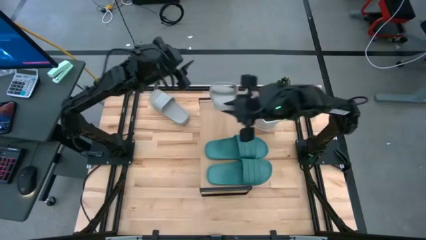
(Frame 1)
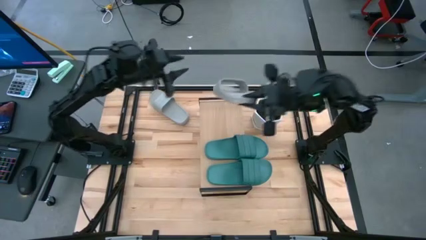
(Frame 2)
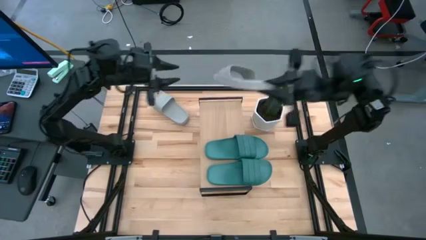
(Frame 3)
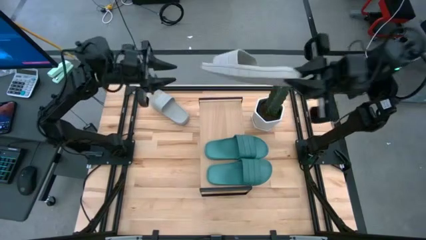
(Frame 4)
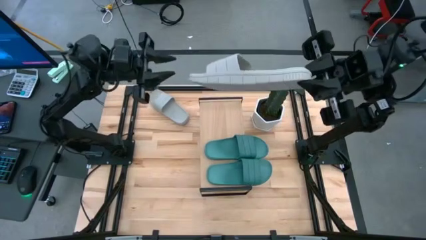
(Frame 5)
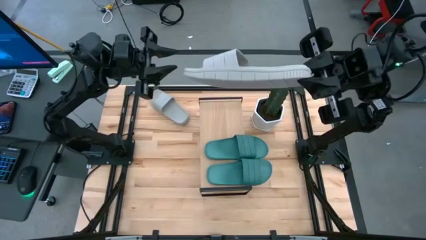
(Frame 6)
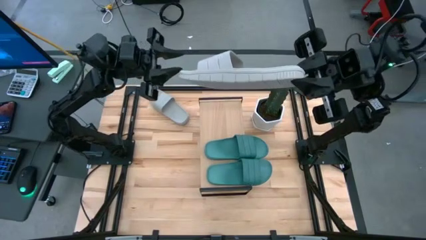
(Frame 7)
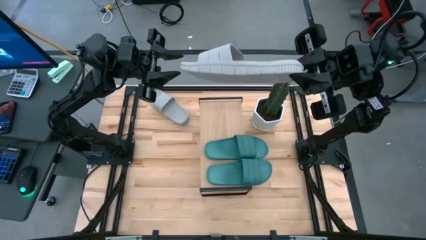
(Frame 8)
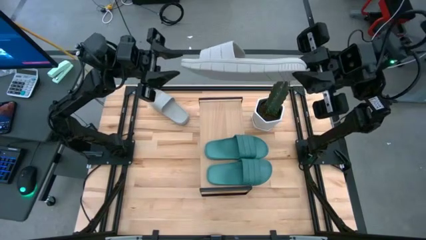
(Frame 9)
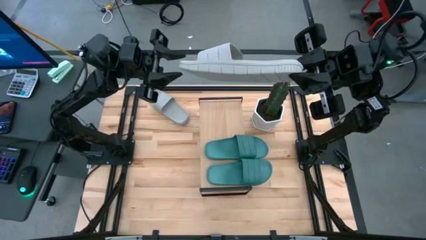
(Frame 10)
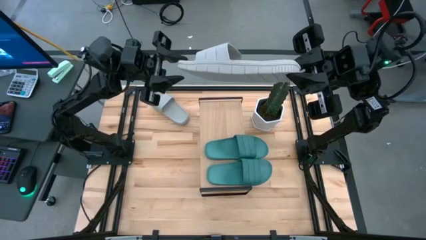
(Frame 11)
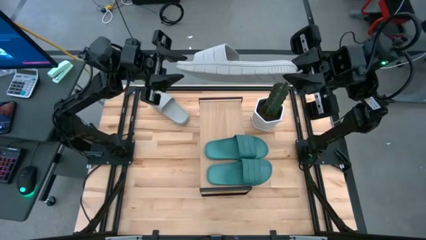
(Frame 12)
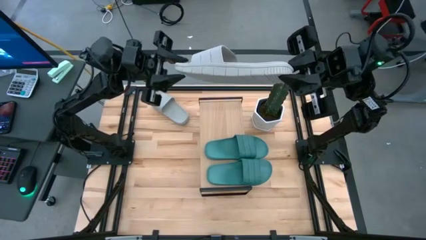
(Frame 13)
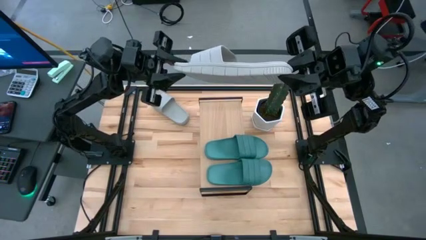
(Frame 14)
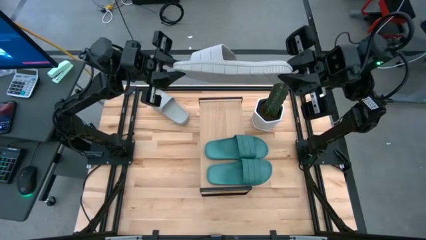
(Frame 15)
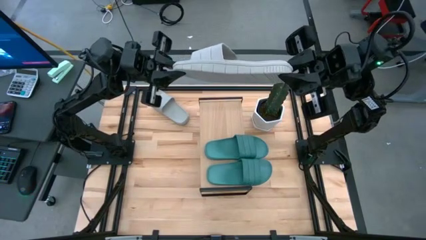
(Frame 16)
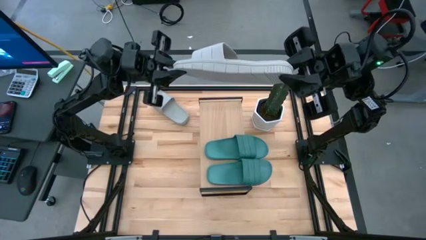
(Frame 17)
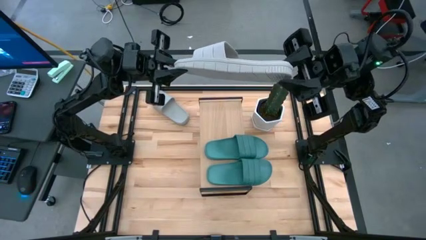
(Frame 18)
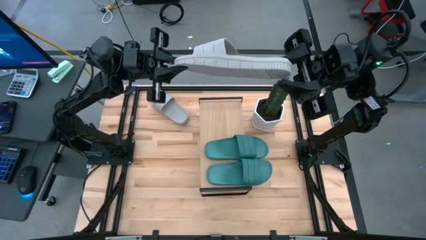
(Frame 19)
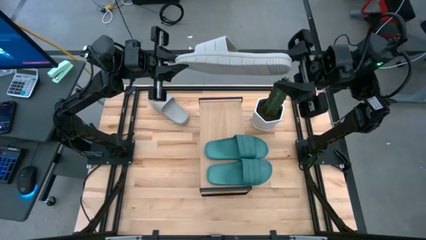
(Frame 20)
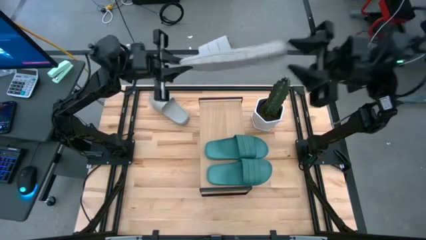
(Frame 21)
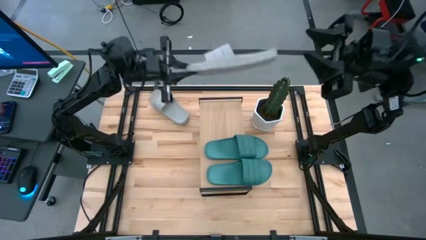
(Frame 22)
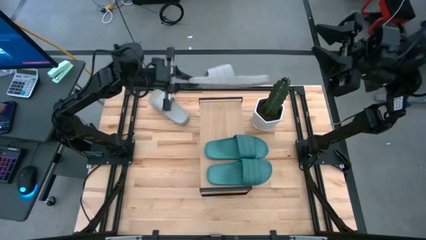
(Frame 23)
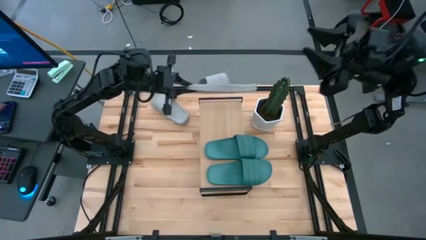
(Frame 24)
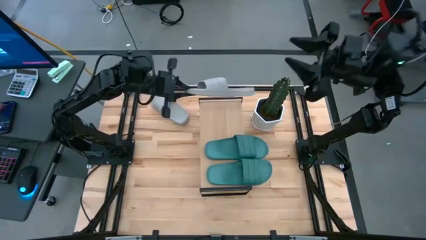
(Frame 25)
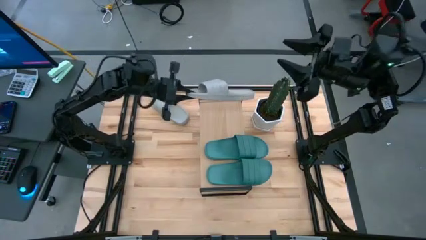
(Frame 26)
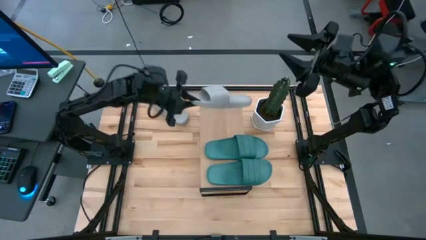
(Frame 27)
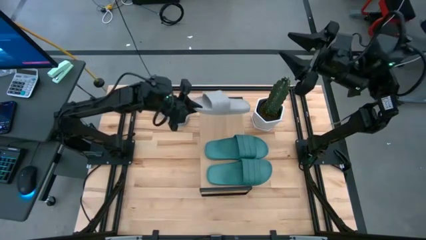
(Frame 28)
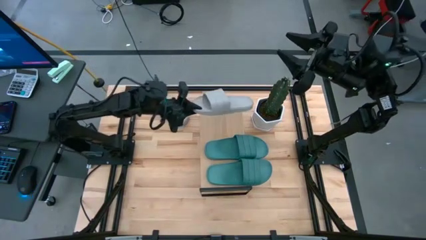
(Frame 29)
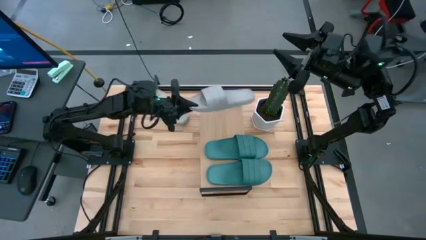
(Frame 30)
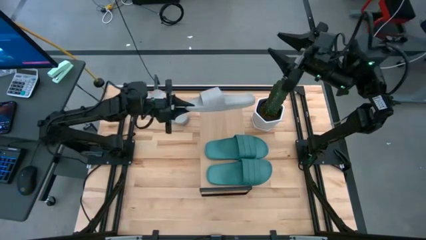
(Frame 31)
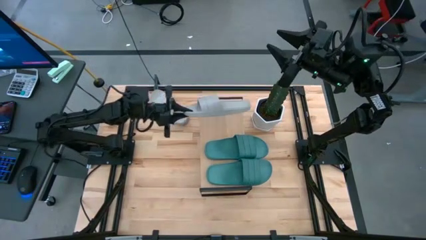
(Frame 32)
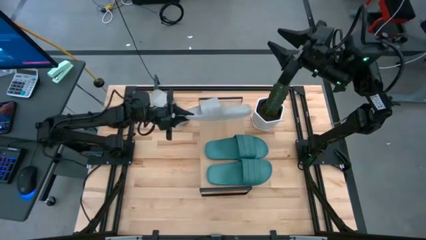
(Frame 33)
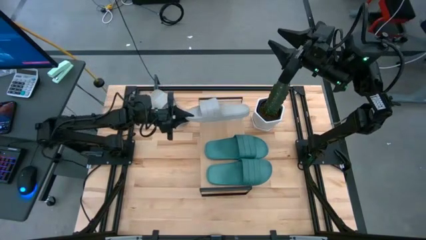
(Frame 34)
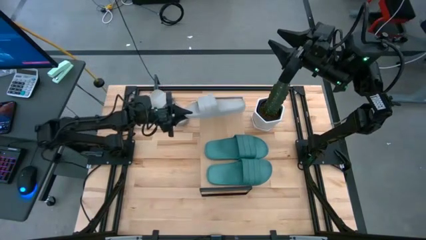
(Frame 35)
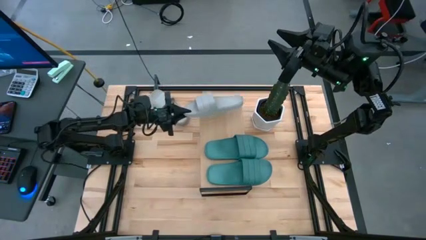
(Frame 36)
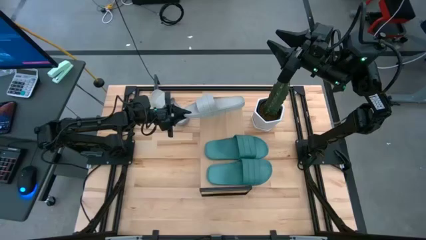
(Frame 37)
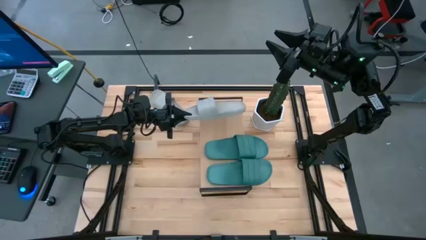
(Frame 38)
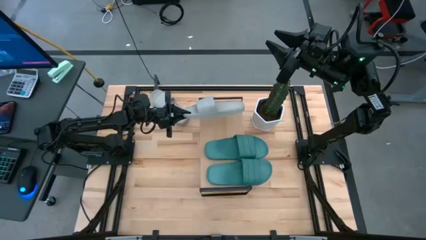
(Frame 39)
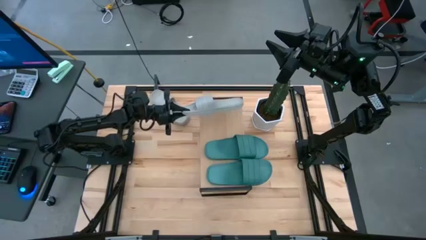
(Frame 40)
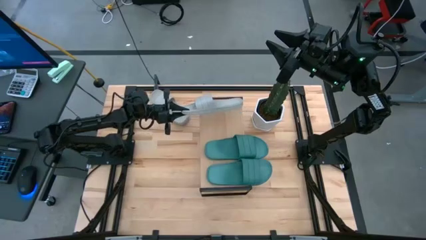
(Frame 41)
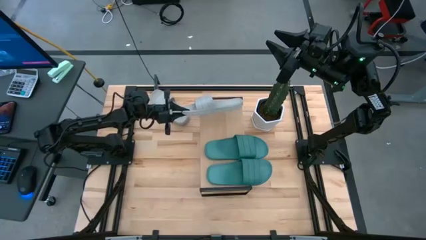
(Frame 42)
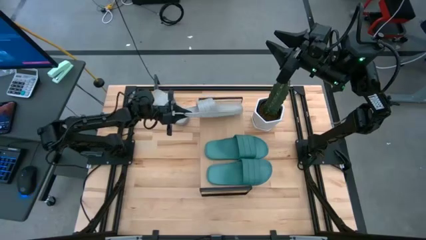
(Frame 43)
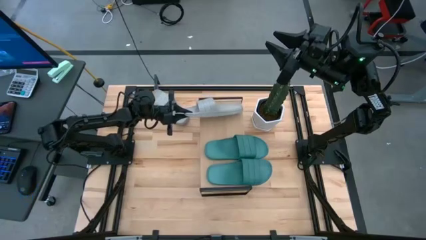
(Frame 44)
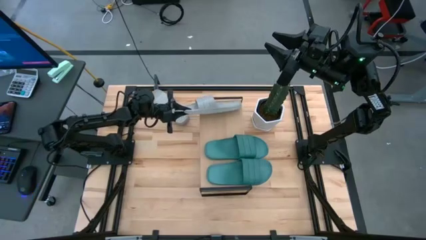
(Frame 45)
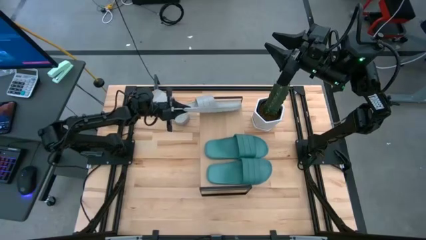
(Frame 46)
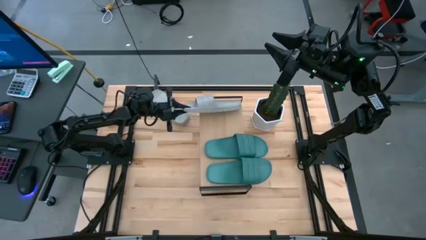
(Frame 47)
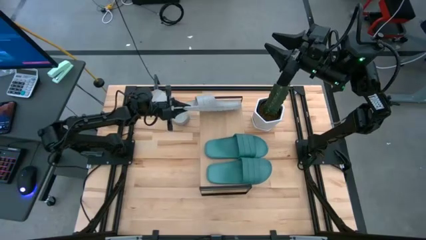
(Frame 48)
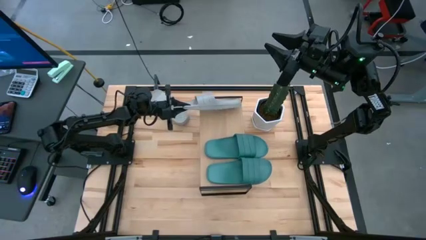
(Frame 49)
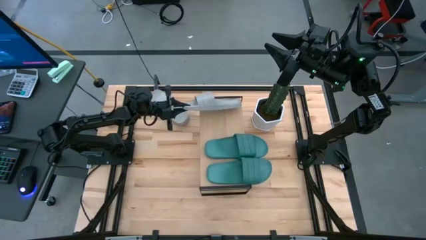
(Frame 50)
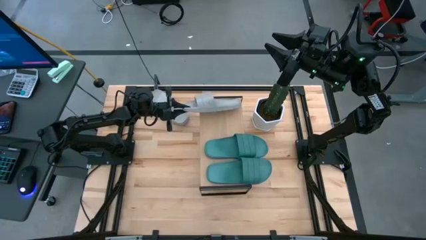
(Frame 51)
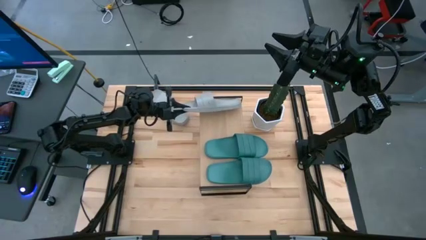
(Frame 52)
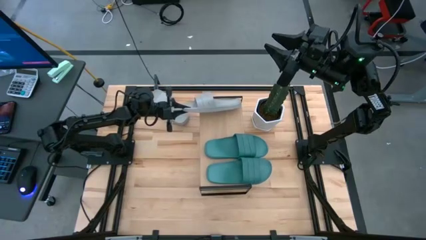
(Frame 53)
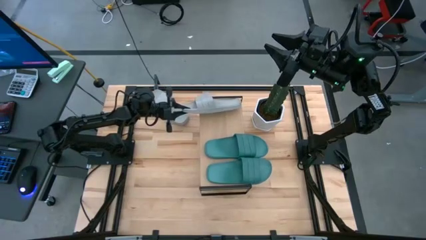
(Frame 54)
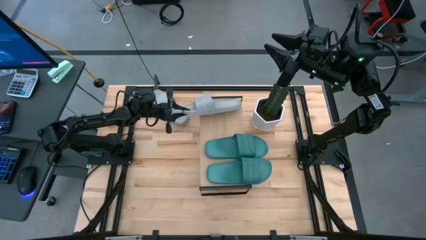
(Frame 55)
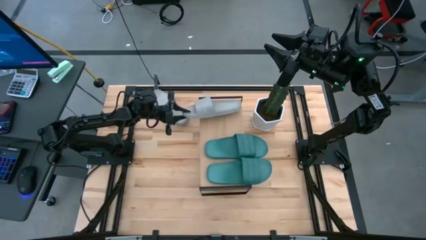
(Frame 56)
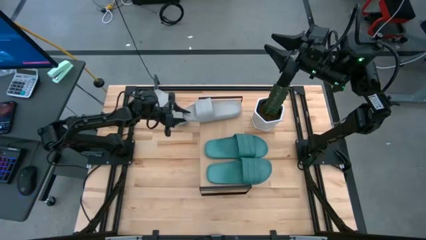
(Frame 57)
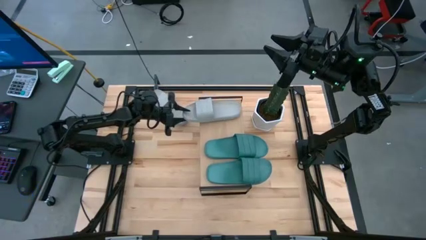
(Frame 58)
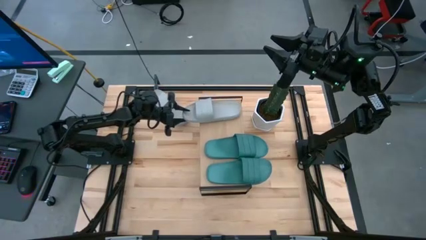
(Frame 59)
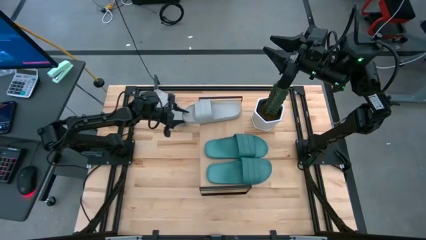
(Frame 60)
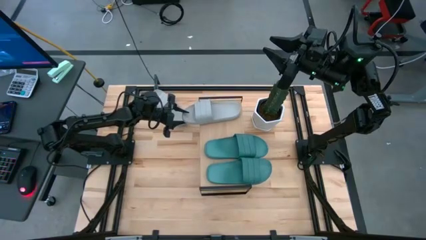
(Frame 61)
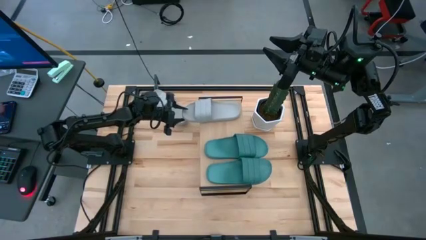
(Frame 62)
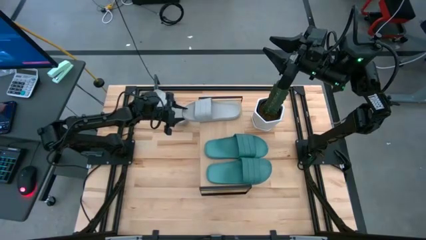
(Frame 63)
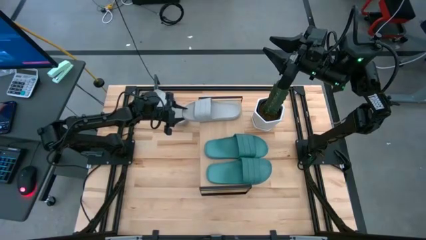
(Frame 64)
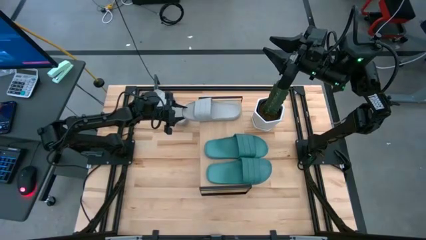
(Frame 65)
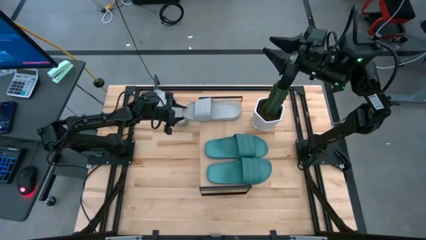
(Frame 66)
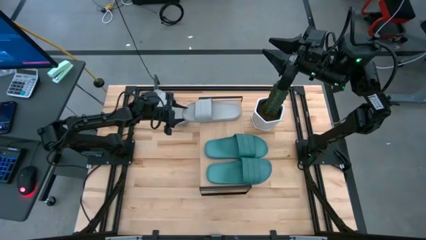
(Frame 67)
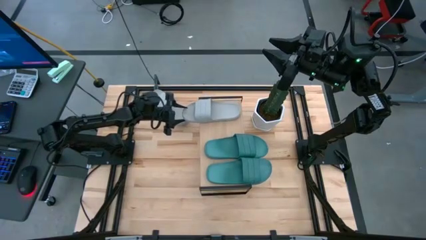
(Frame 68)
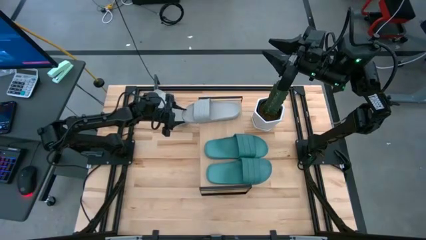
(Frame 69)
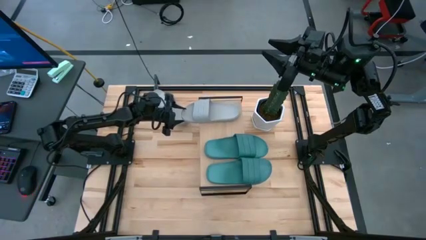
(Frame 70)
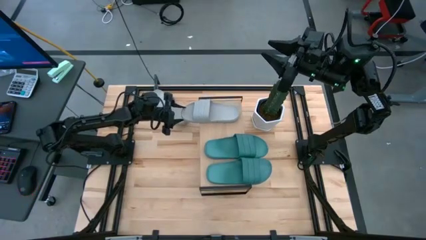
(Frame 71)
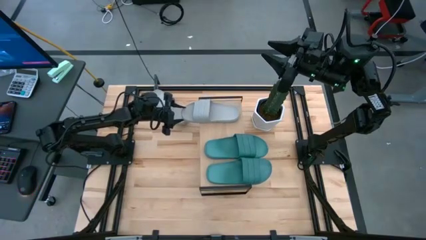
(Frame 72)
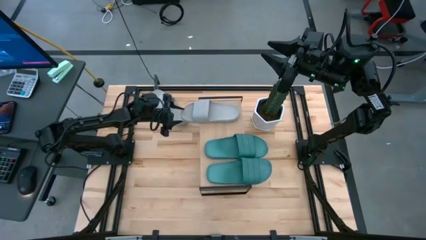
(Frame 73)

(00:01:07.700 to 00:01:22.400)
Task: Pick and place slides into the shelf
Put the bottom gray slide on the shelf
